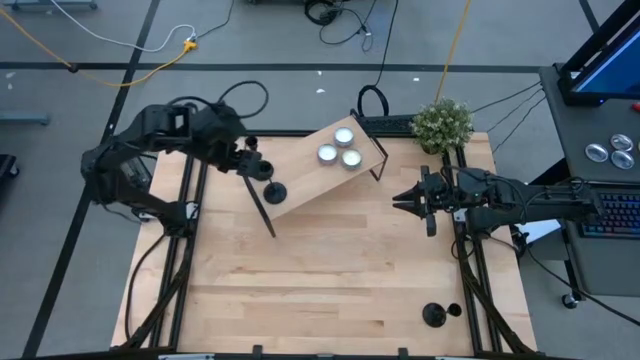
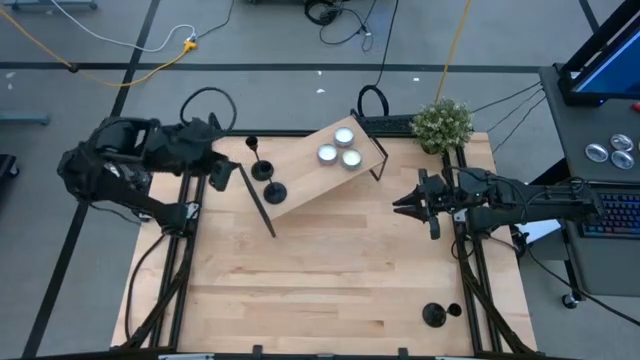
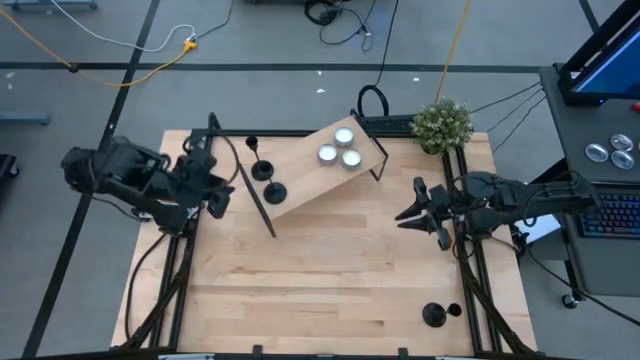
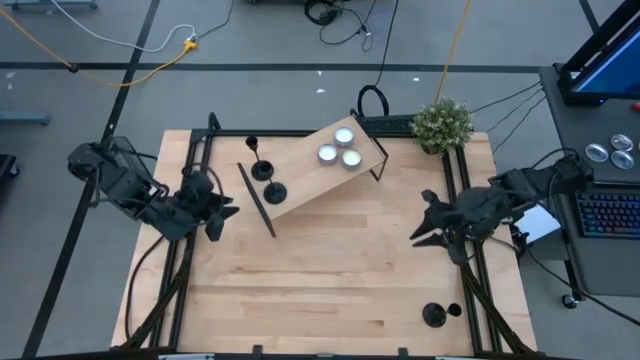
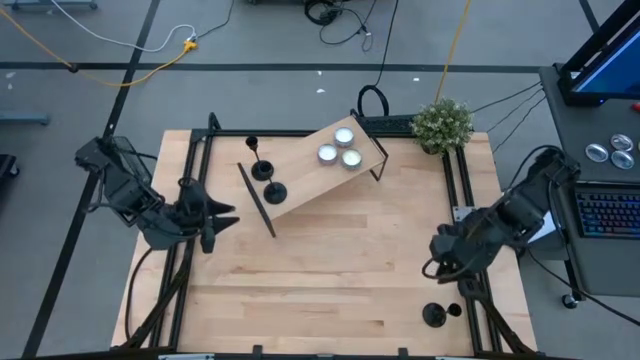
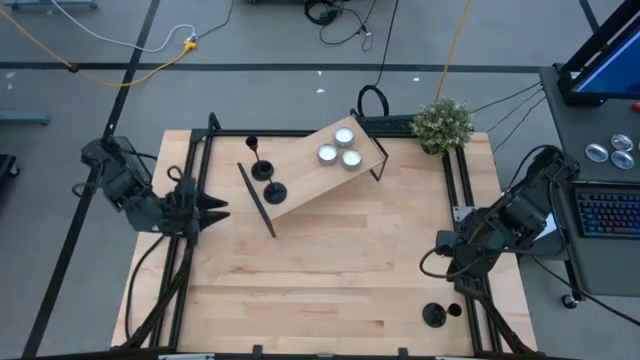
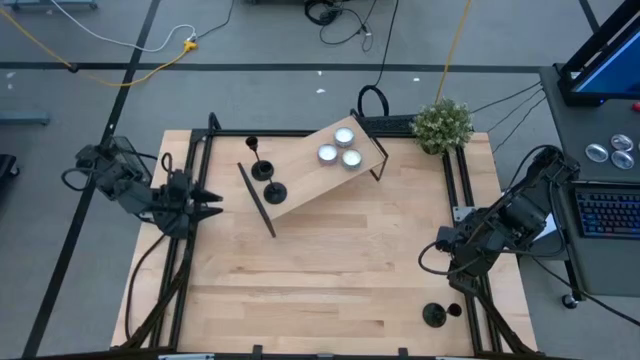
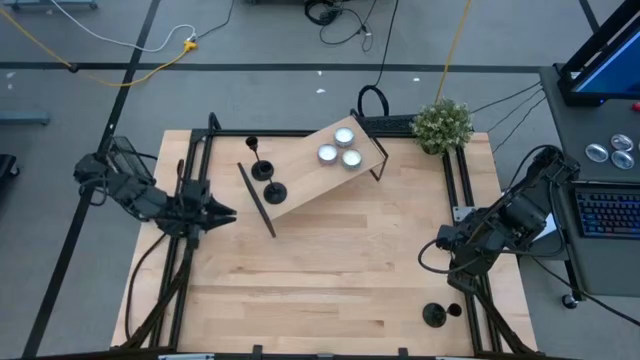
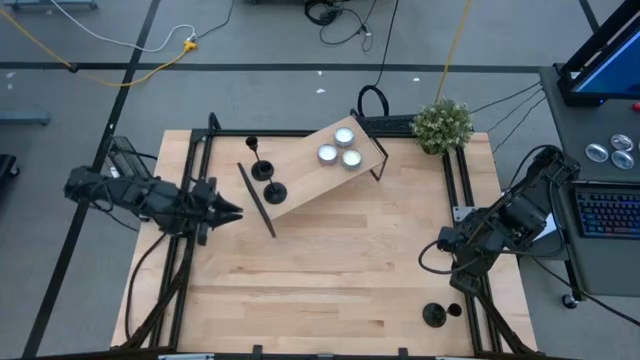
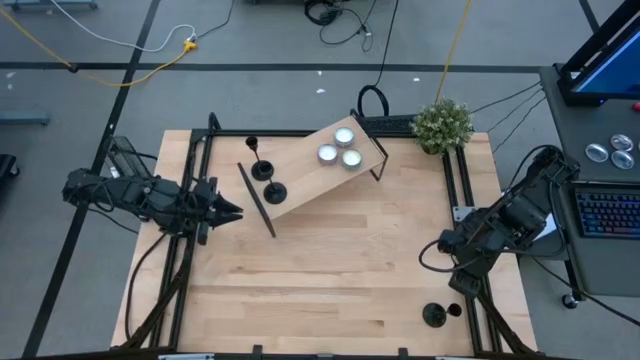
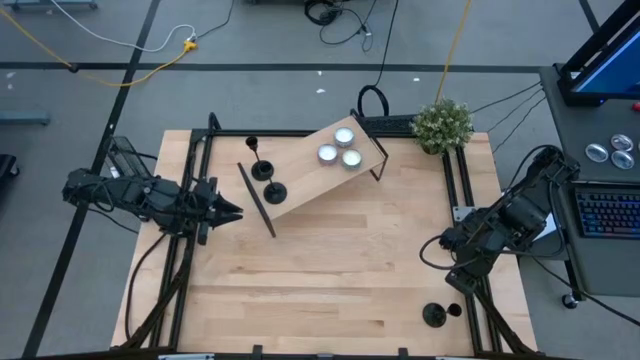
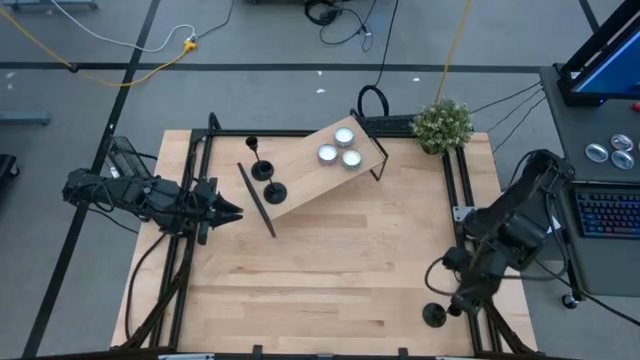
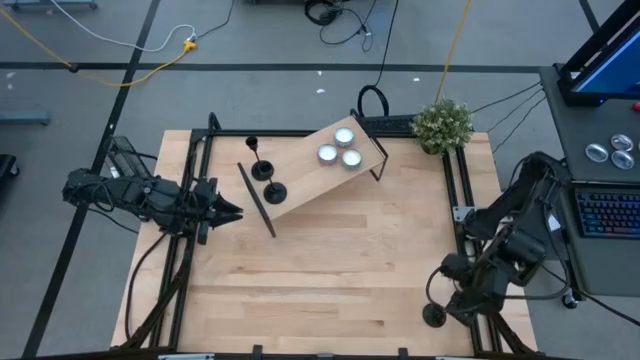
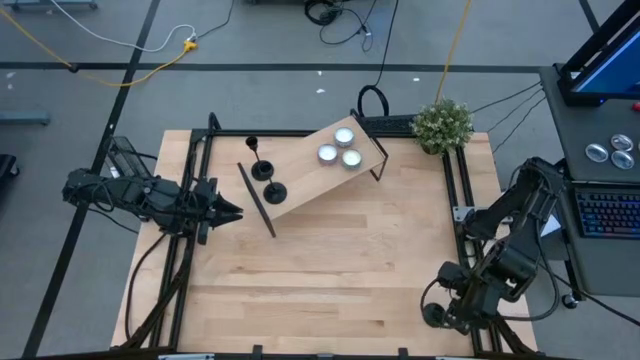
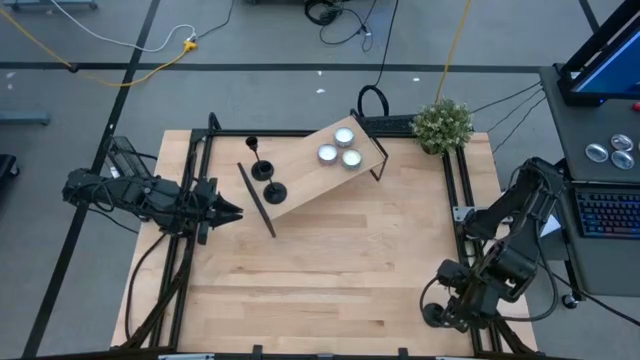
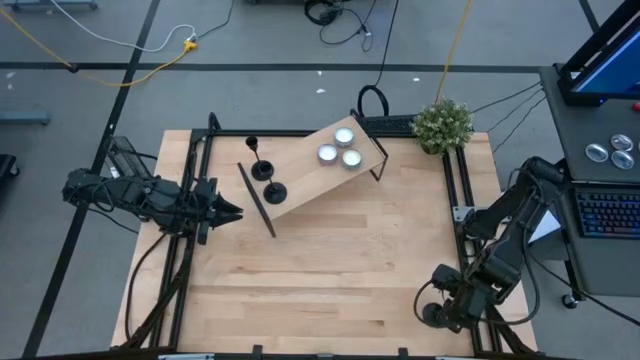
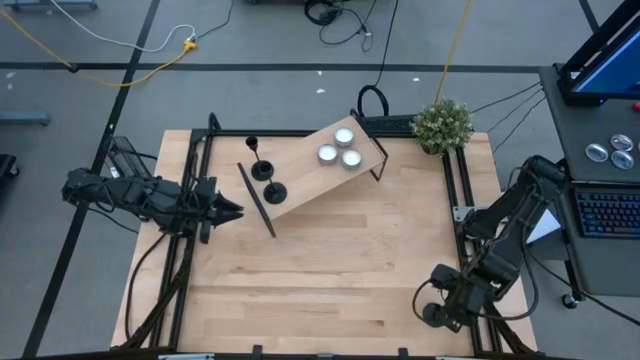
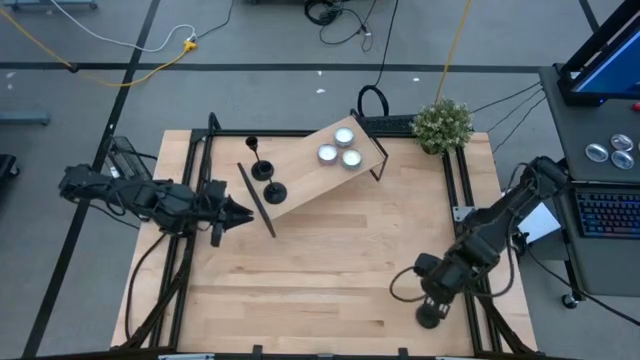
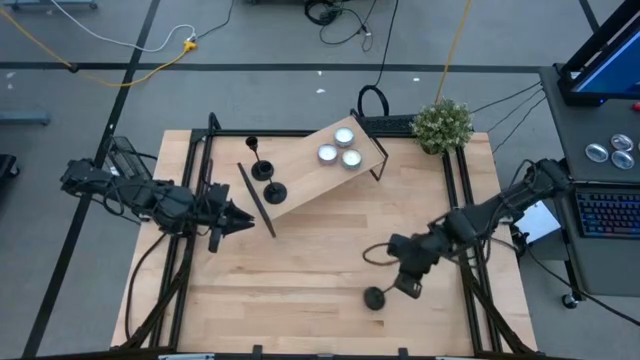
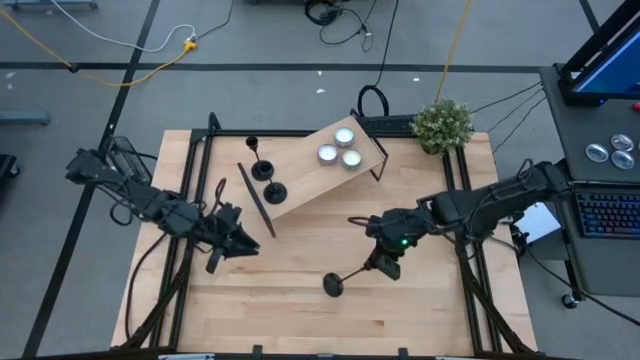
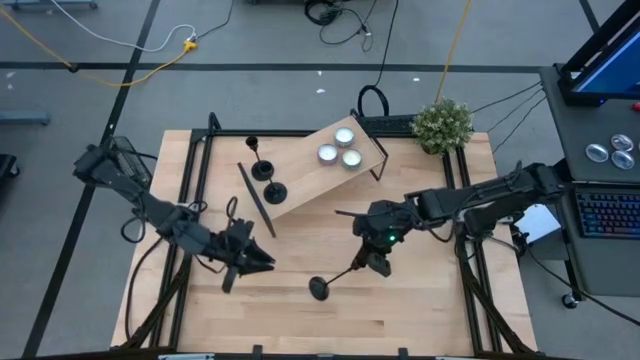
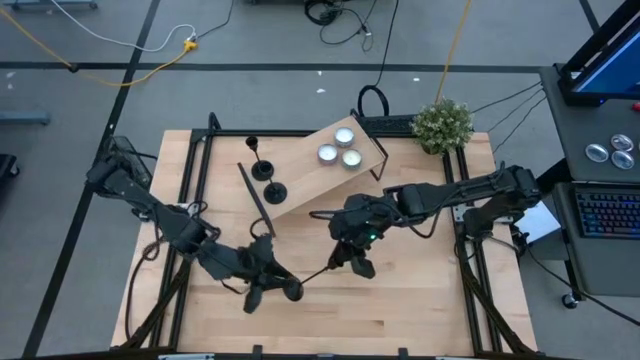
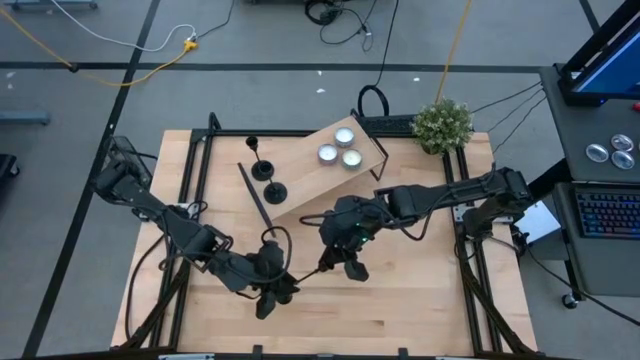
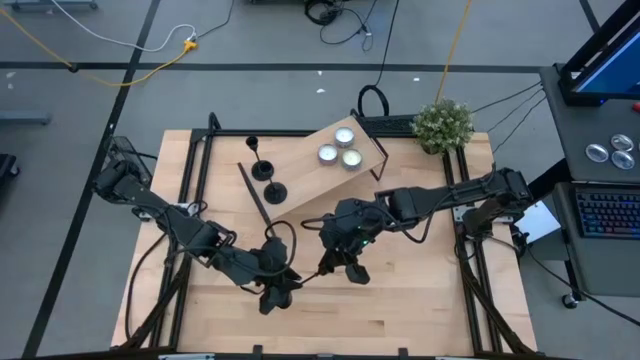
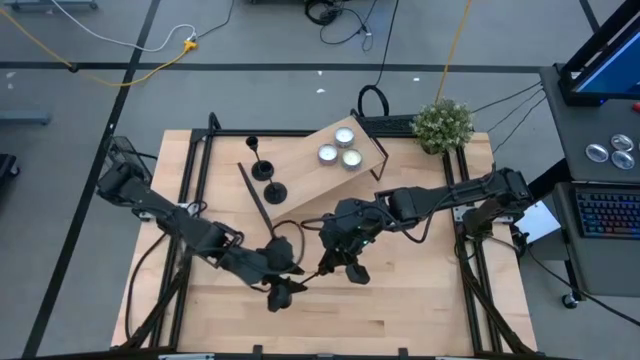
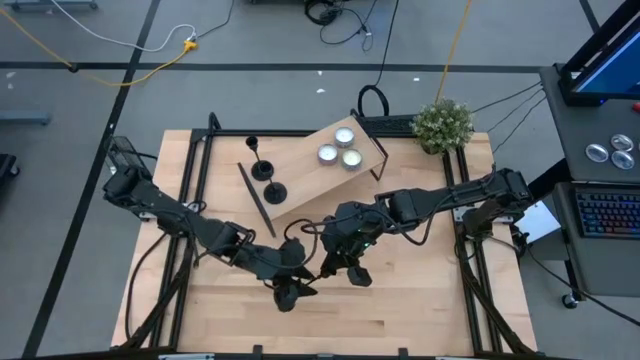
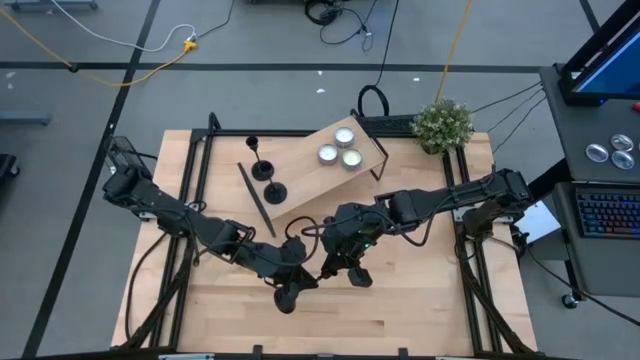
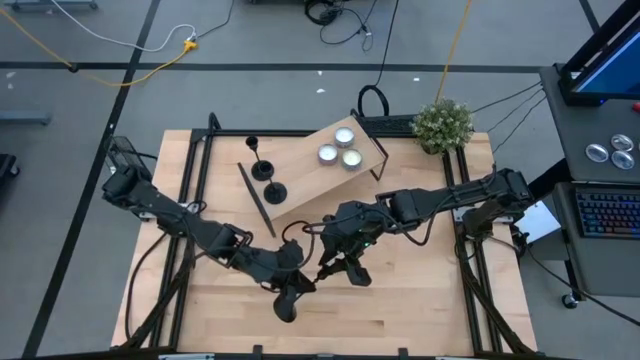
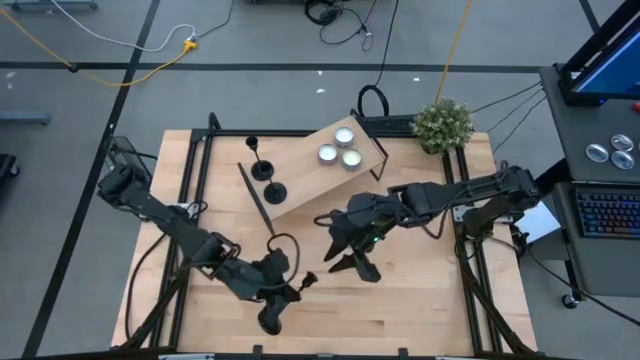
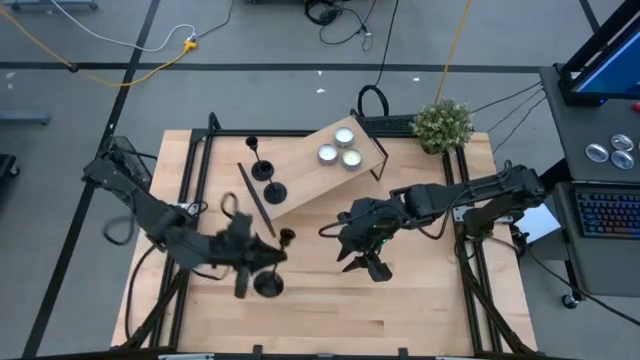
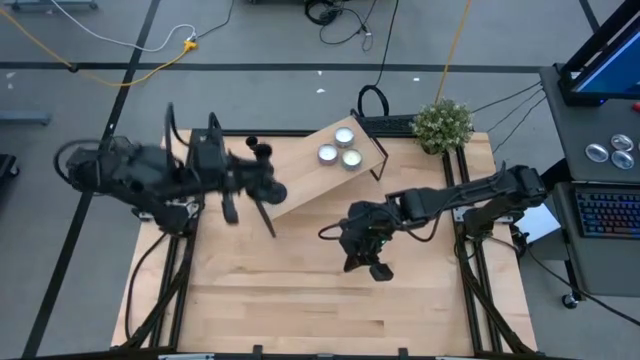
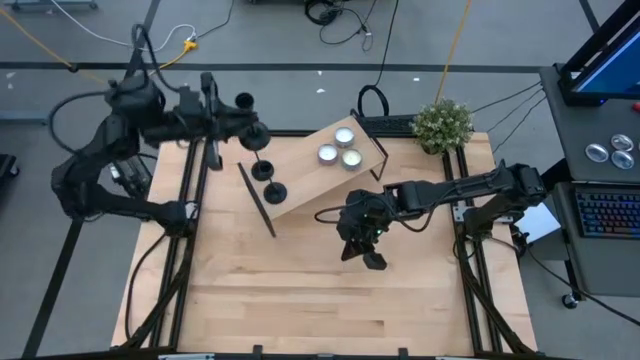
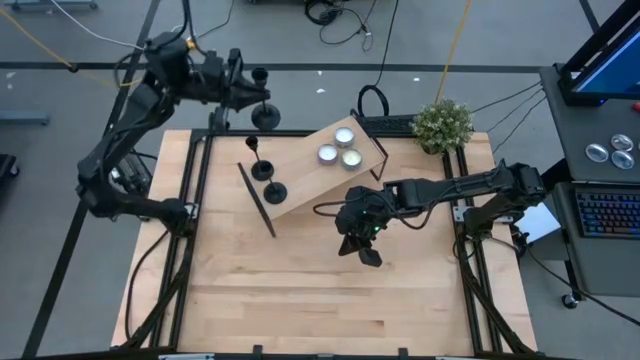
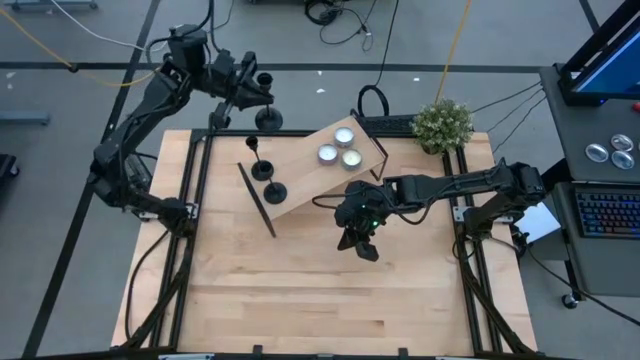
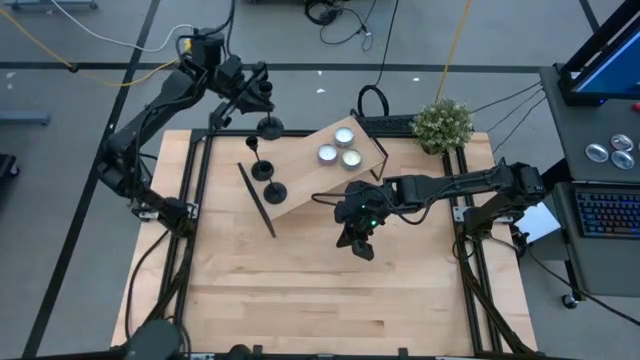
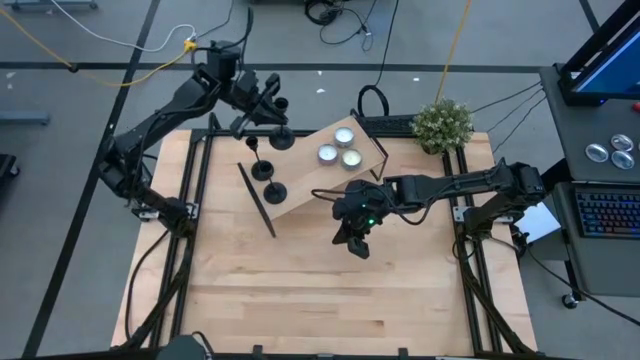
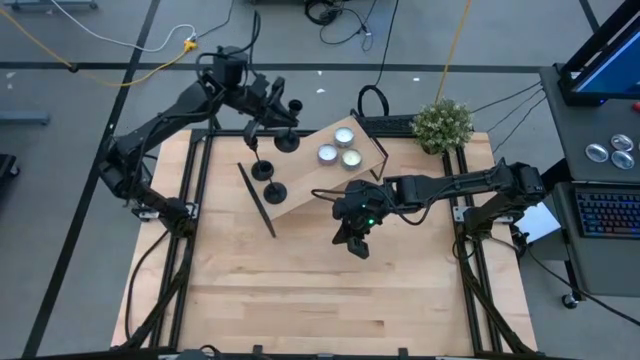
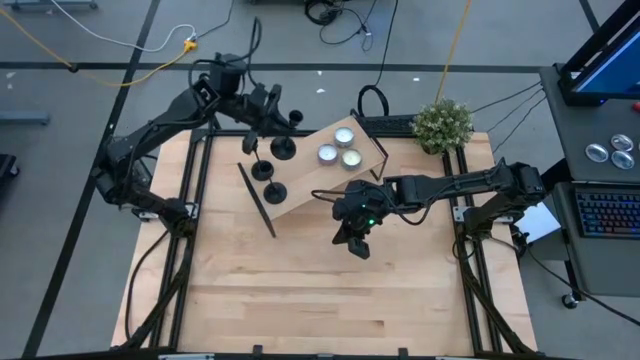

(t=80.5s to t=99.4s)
Task: Pick & Place candle stick holders
Put the black candle holder on the shelf
